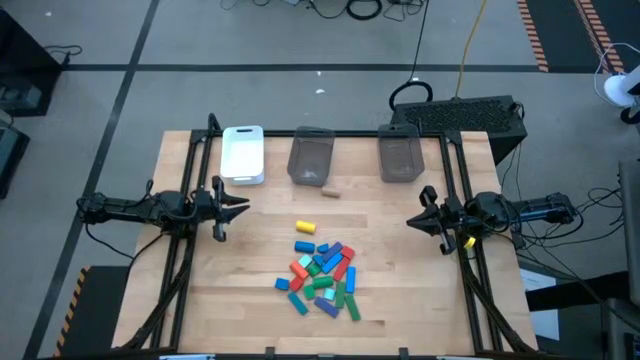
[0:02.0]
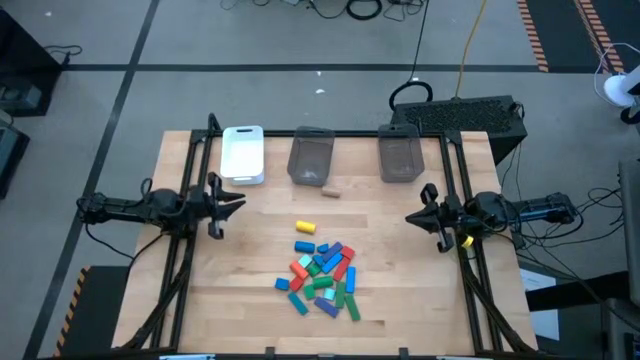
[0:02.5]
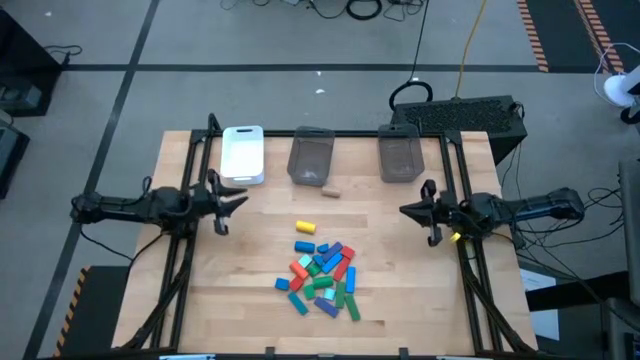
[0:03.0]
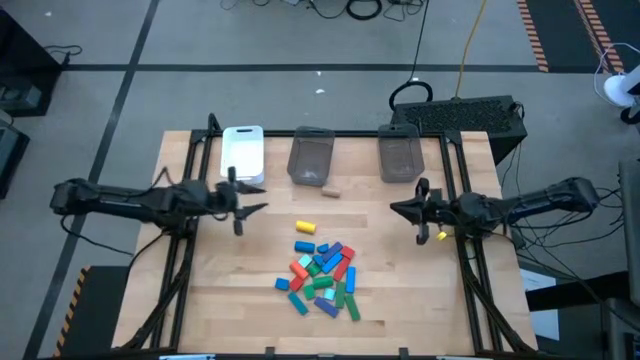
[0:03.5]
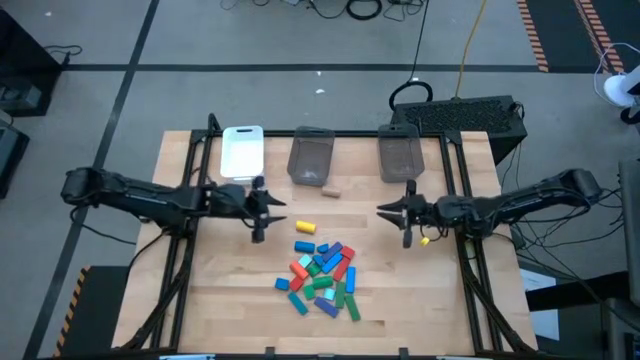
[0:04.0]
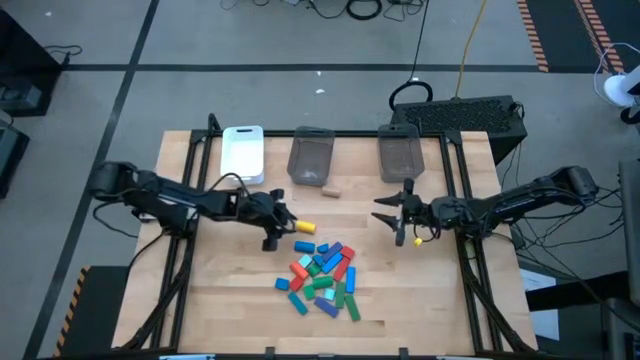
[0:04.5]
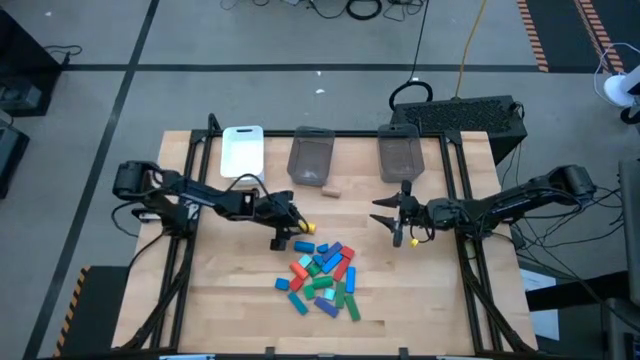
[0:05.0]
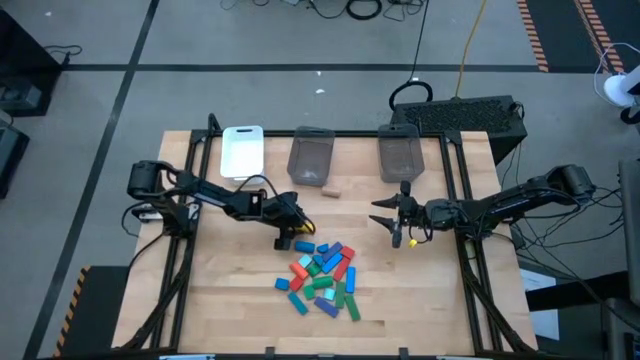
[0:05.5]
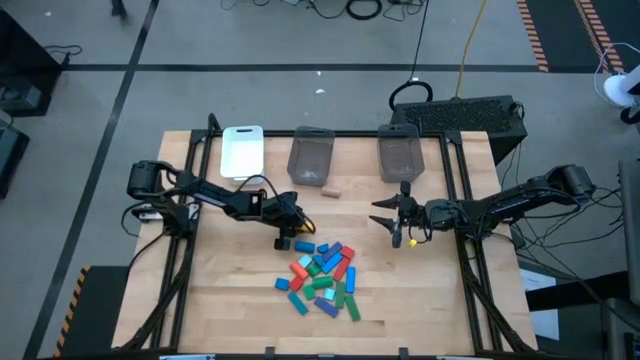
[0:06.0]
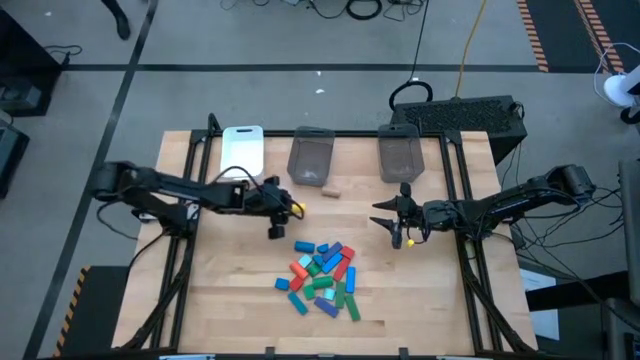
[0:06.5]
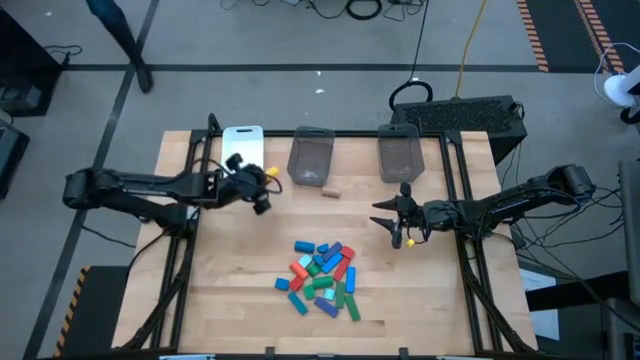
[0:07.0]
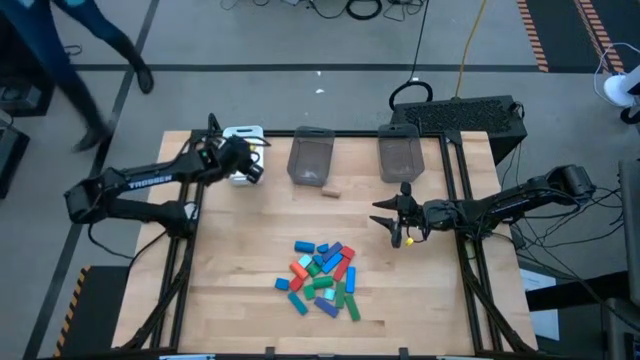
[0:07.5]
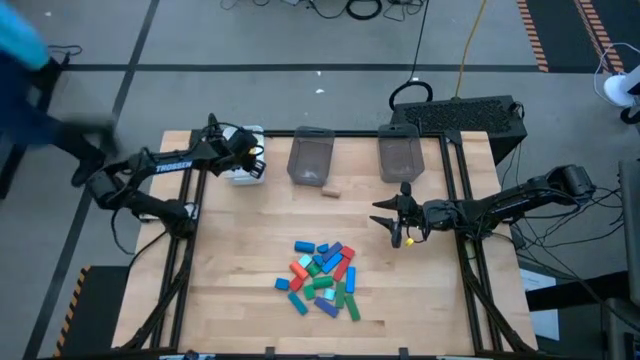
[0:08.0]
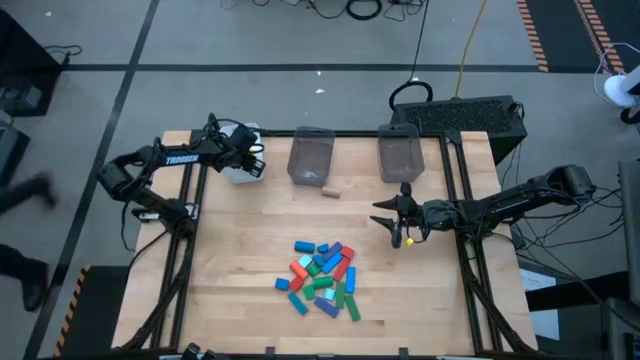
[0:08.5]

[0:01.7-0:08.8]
Task: Sort blocks by size
Put the yellow cylindrical block into the white bin

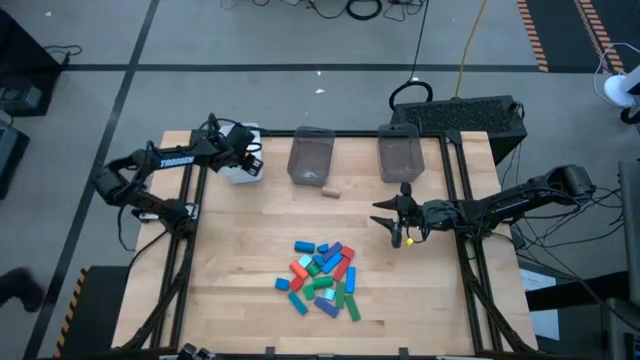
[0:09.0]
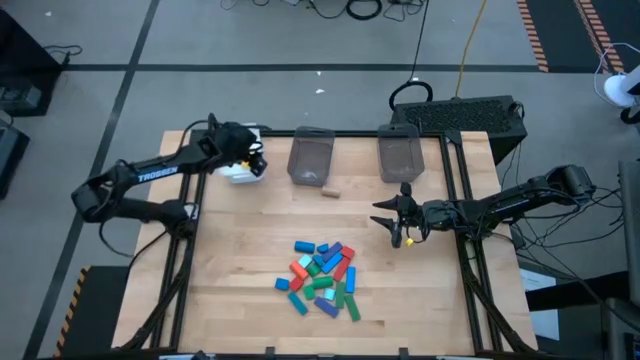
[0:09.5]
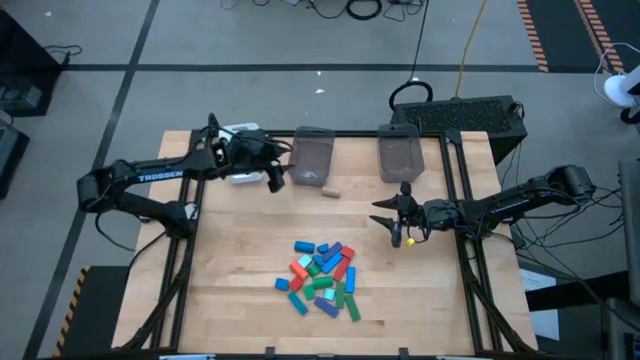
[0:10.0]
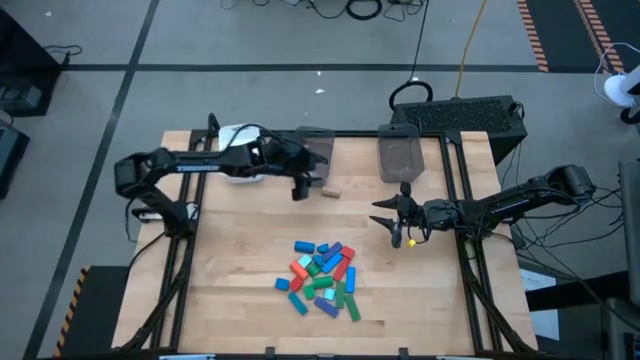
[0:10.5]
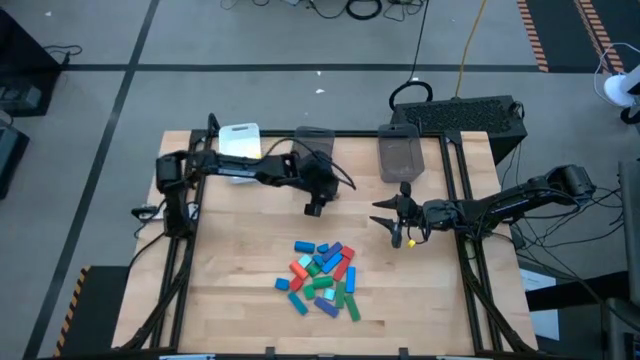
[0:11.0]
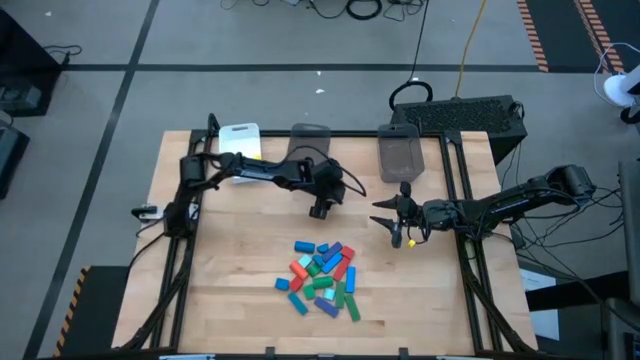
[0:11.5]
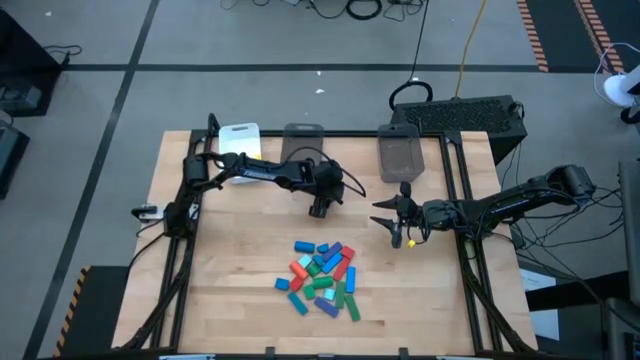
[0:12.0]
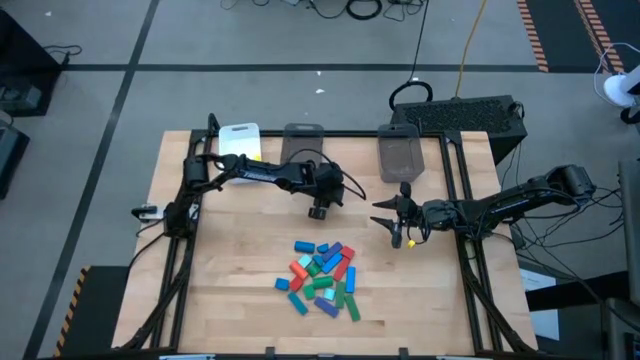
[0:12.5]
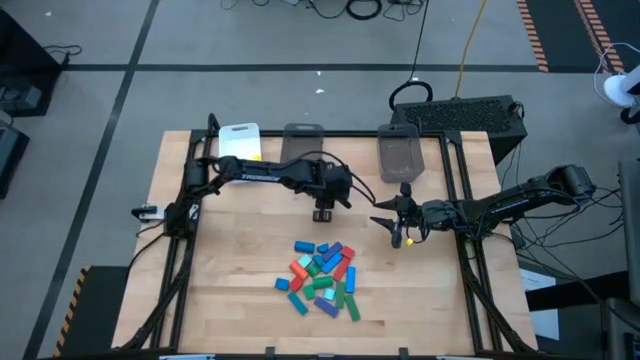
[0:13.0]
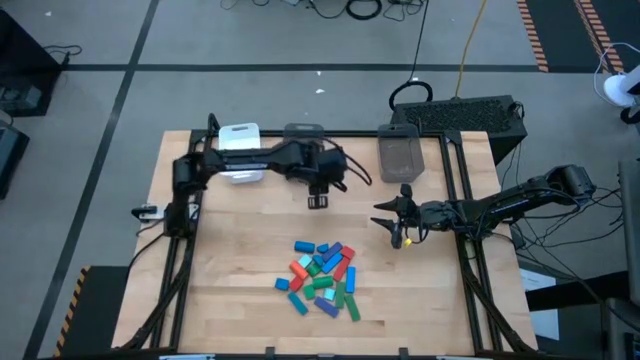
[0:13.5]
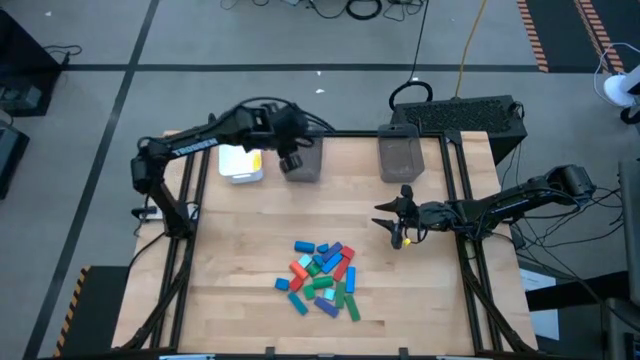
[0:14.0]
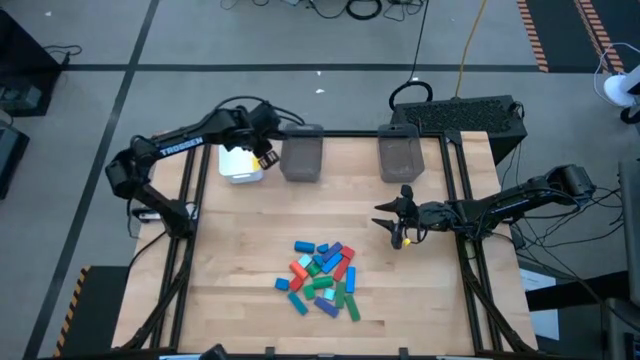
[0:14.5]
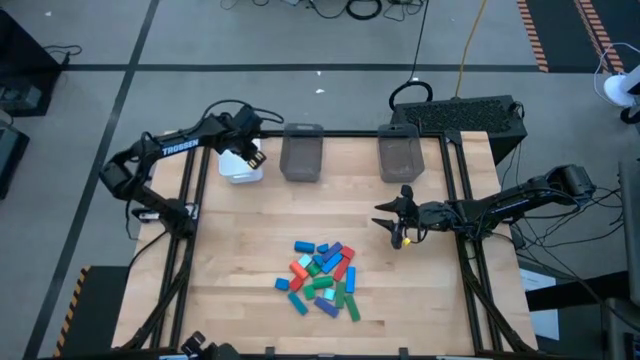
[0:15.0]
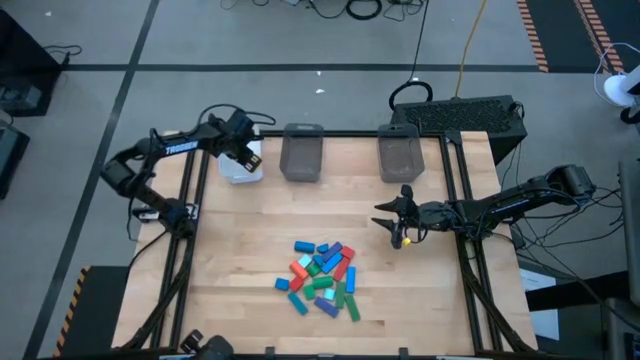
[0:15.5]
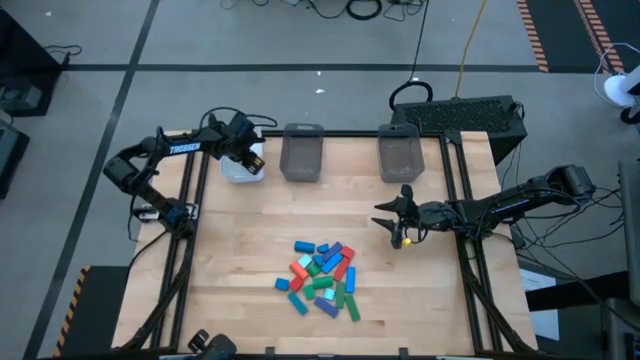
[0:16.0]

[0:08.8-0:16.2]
Put the brown cylindrical block into the white bin

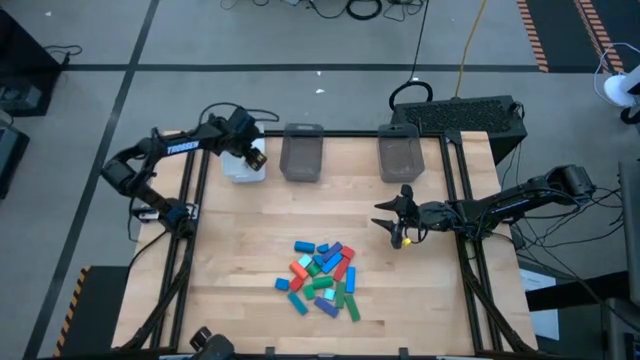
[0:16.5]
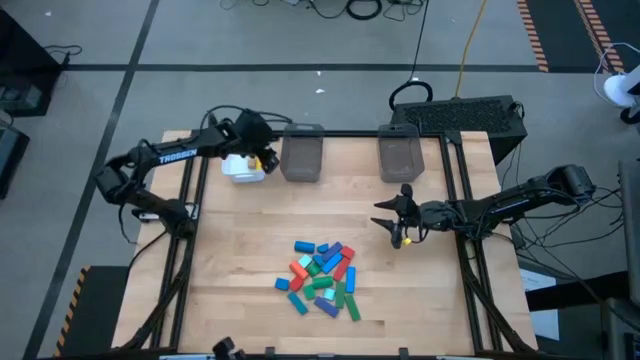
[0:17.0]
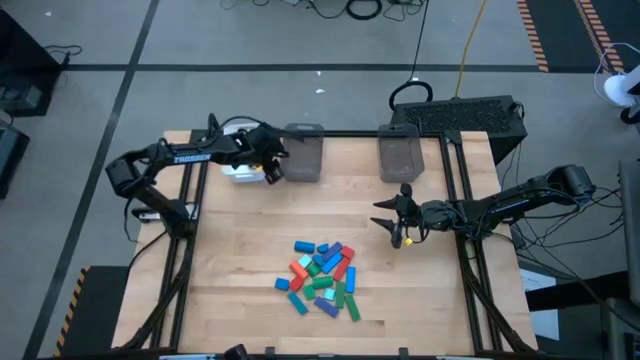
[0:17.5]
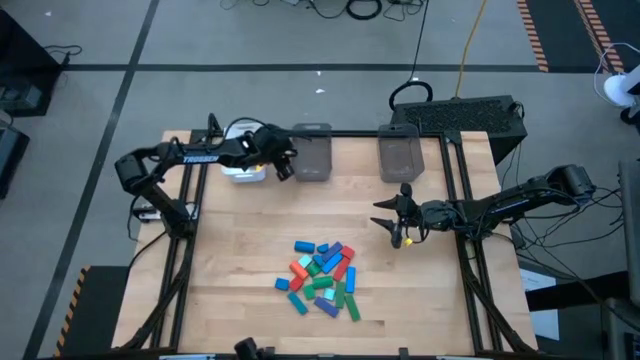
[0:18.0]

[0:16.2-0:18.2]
Adjust the left black bin

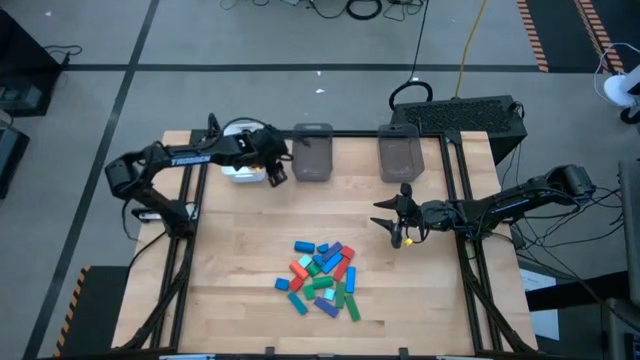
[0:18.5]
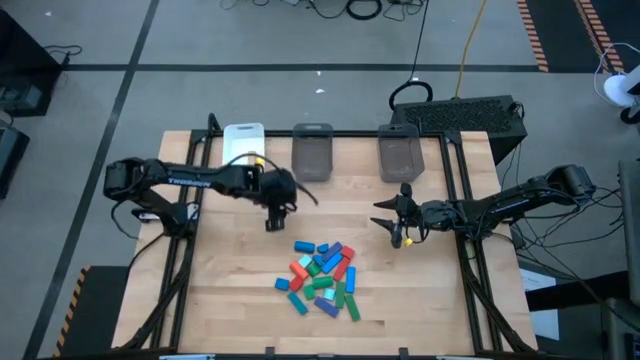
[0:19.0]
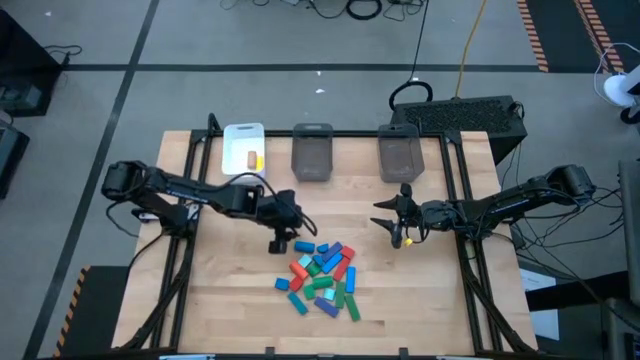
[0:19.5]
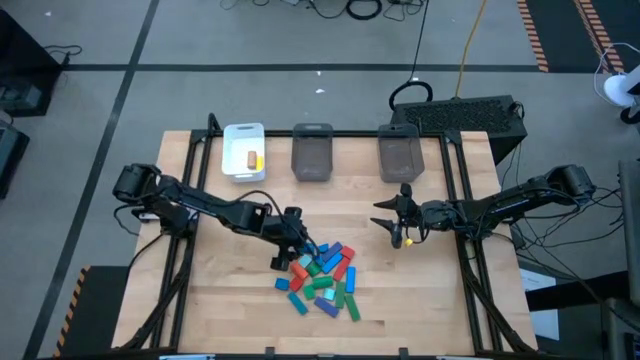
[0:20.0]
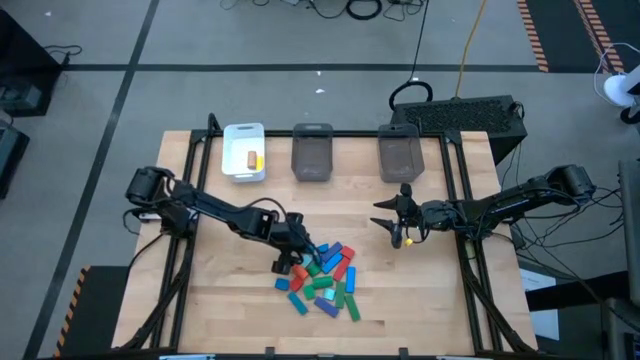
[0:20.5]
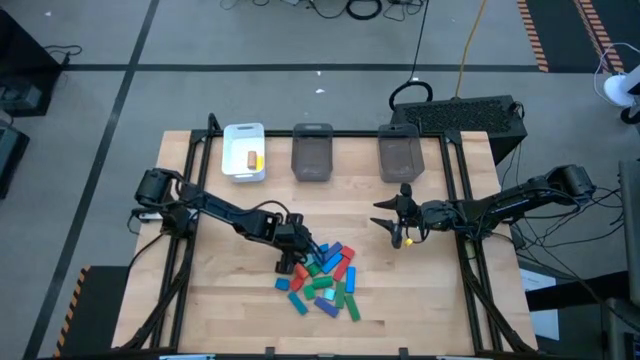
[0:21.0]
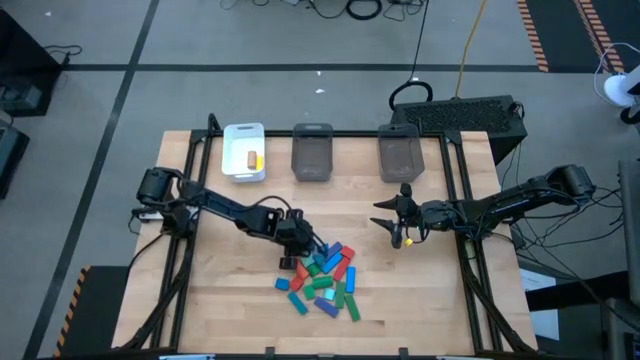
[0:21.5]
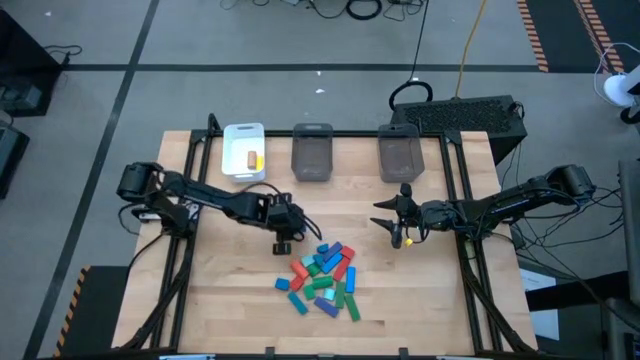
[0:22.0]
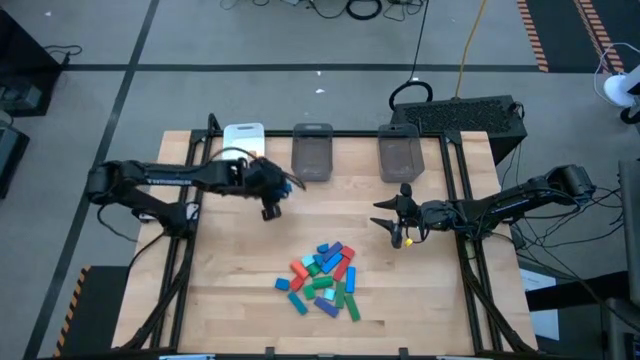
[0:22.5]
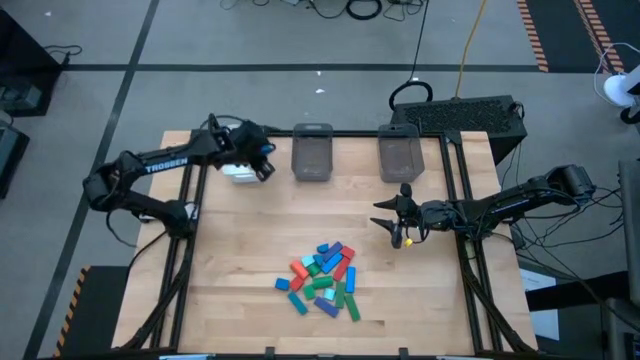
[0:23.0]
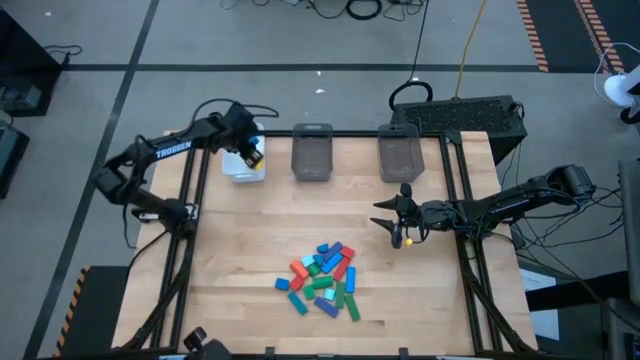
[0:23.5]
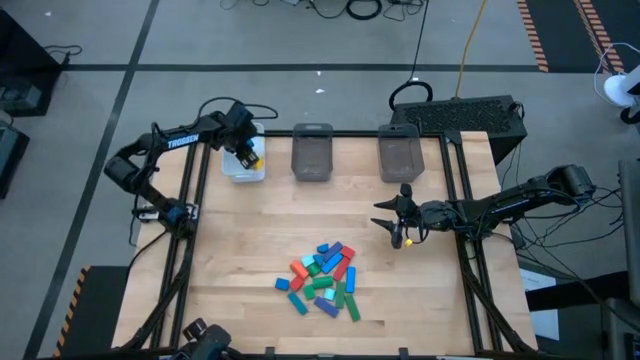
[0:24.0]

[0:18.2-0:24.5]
Put the blue cylindrical block into the white bin
